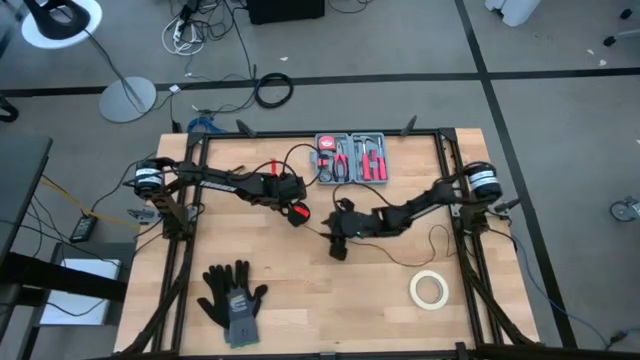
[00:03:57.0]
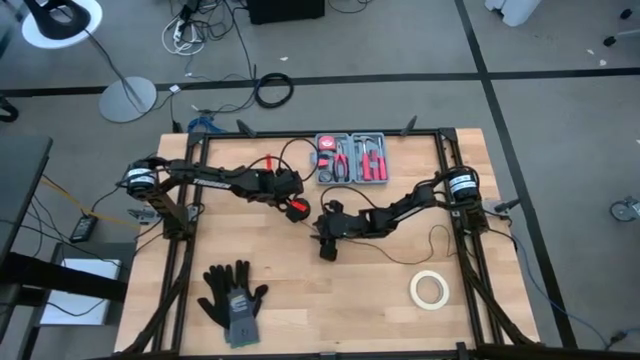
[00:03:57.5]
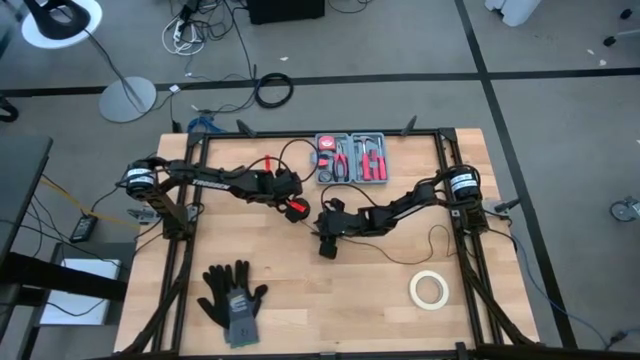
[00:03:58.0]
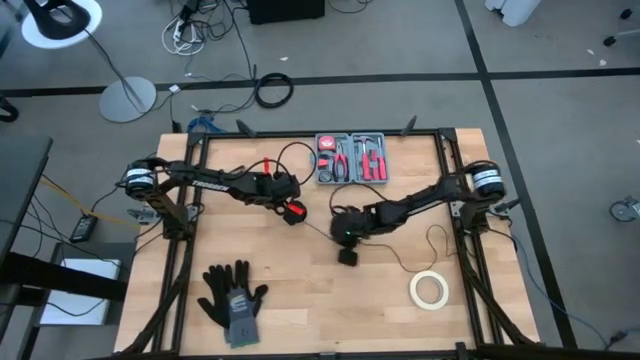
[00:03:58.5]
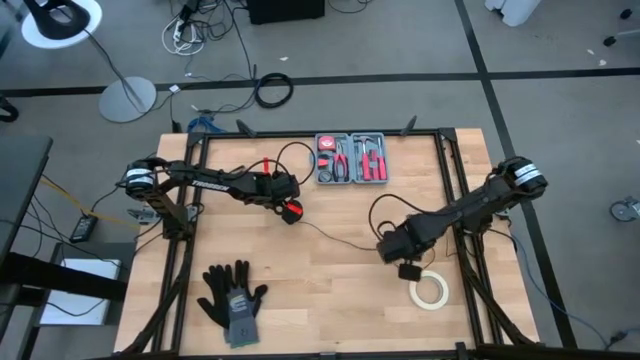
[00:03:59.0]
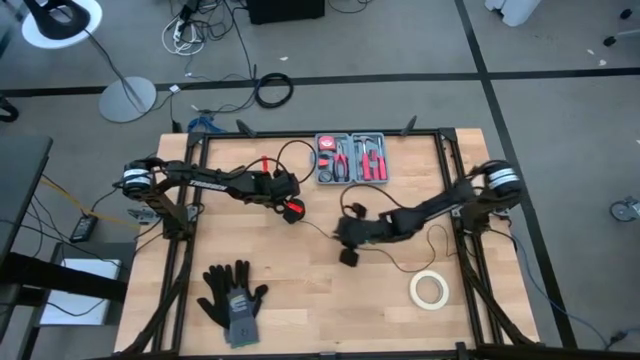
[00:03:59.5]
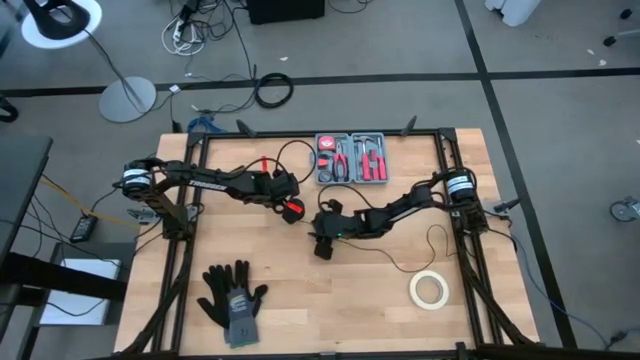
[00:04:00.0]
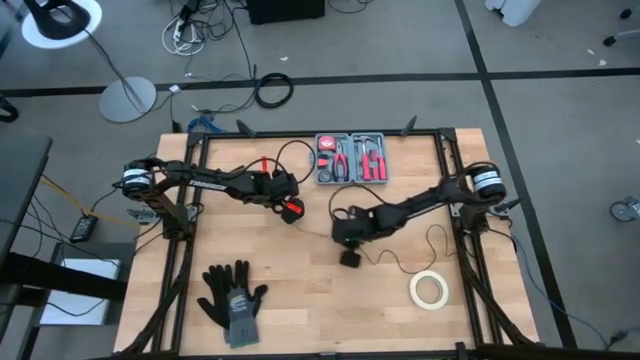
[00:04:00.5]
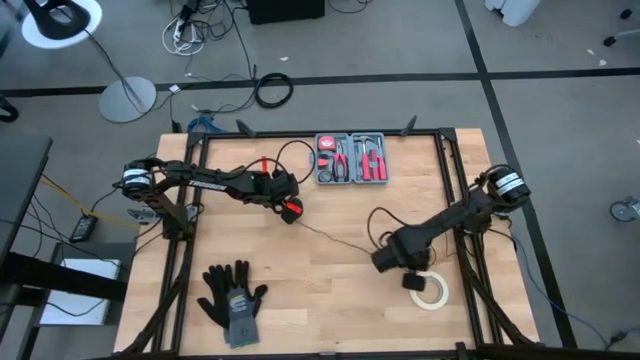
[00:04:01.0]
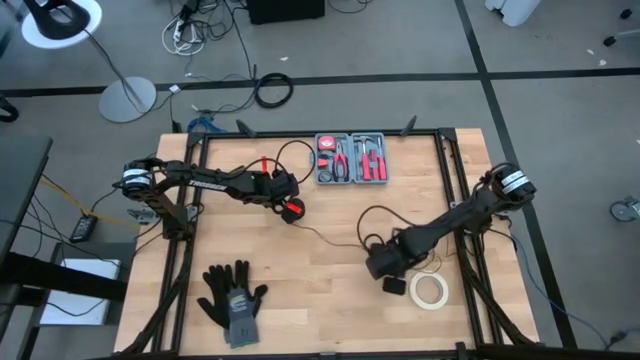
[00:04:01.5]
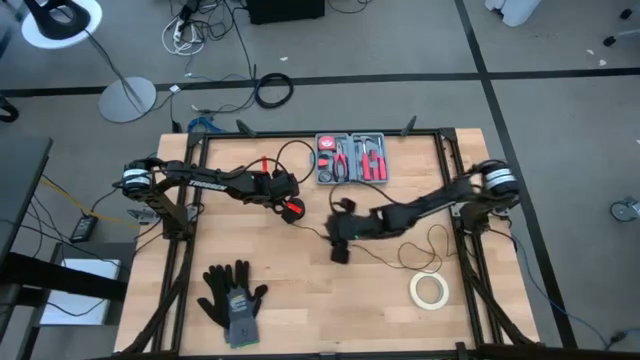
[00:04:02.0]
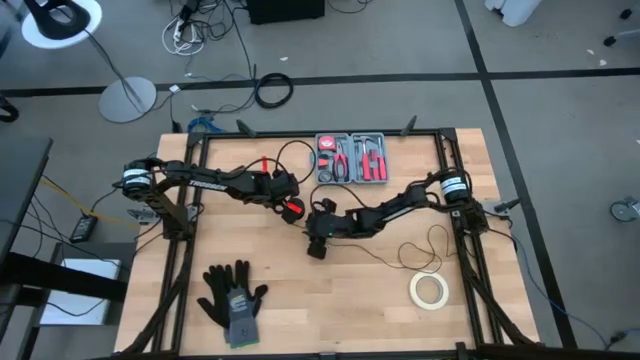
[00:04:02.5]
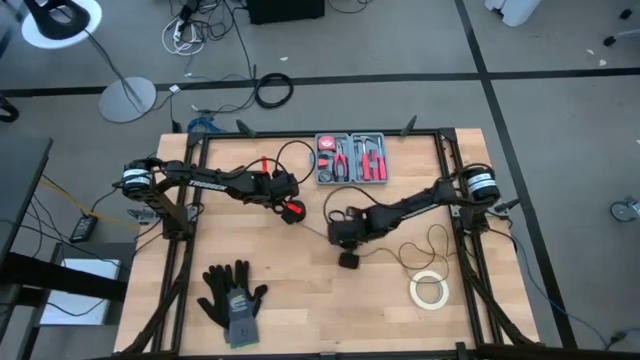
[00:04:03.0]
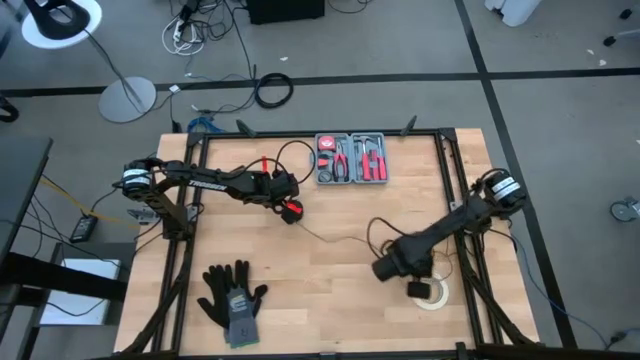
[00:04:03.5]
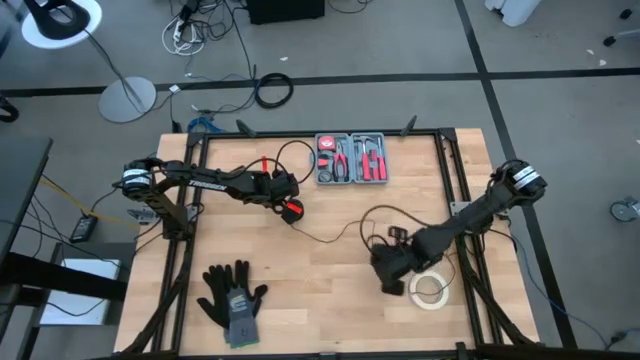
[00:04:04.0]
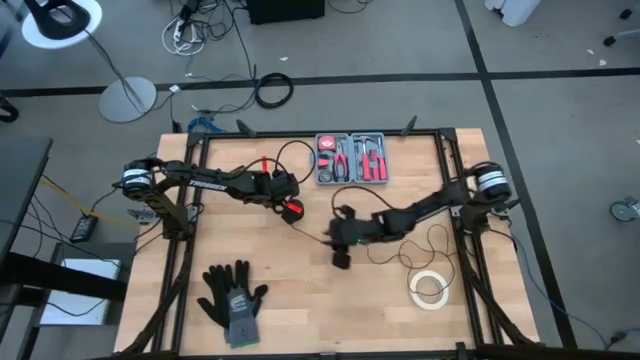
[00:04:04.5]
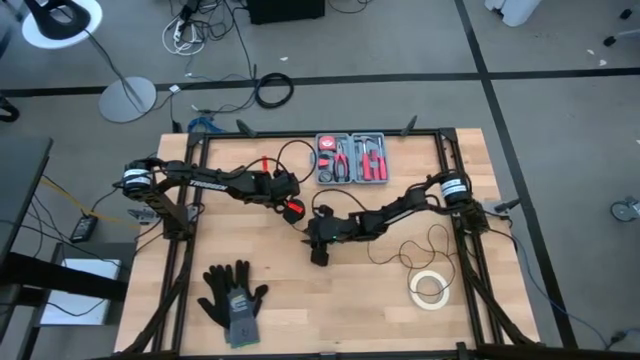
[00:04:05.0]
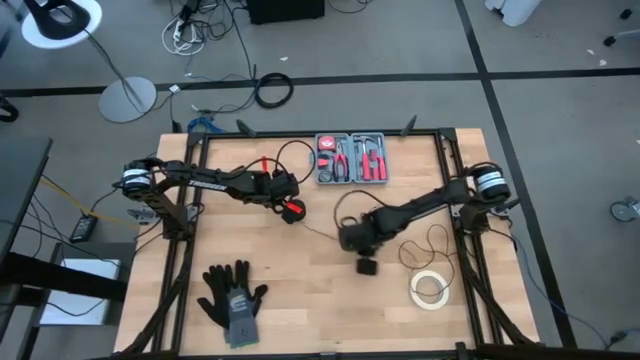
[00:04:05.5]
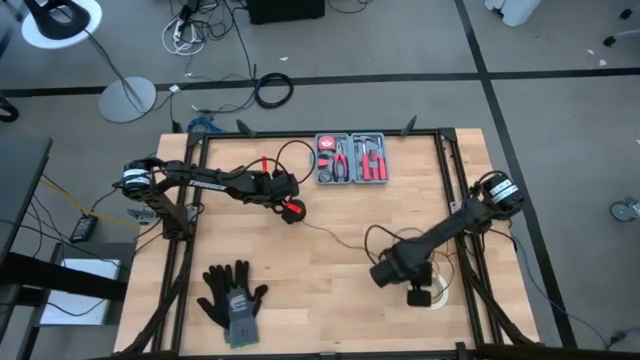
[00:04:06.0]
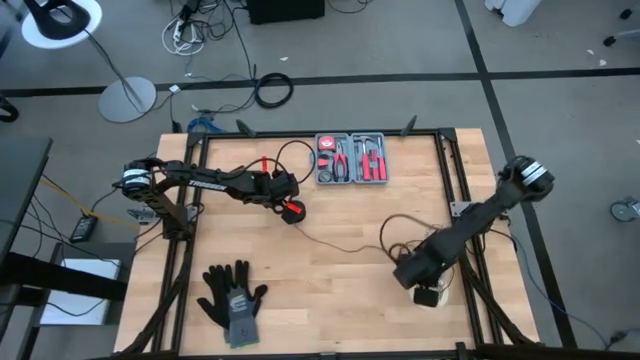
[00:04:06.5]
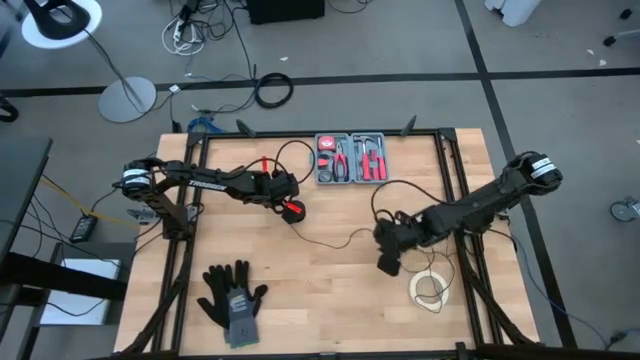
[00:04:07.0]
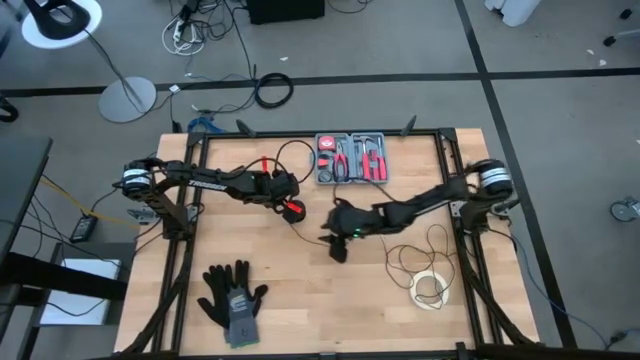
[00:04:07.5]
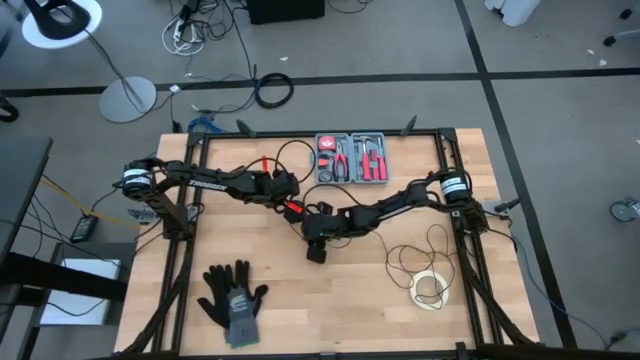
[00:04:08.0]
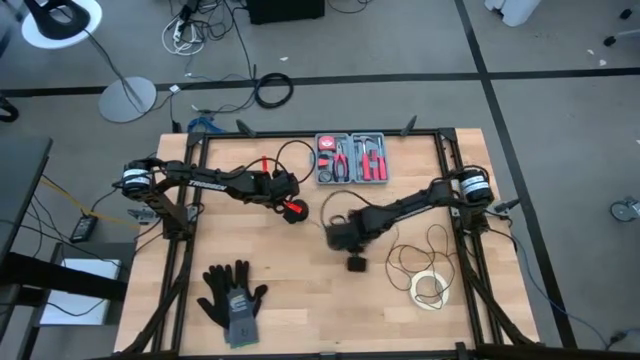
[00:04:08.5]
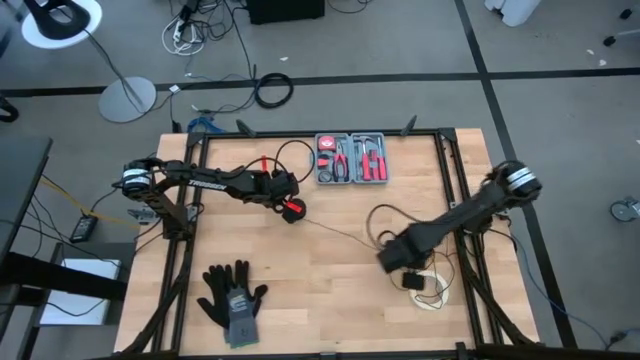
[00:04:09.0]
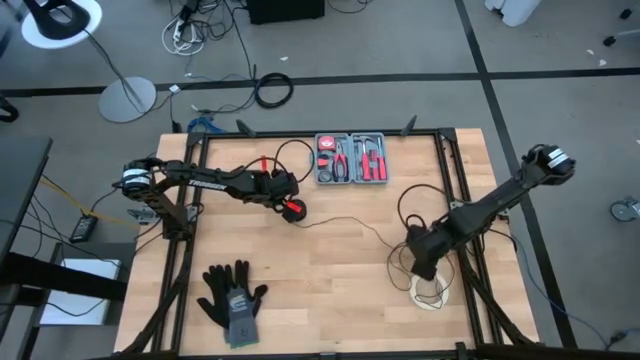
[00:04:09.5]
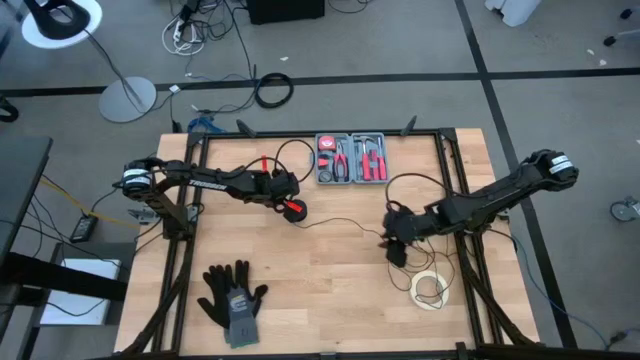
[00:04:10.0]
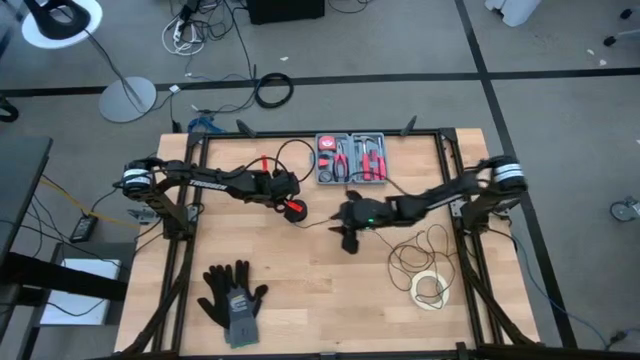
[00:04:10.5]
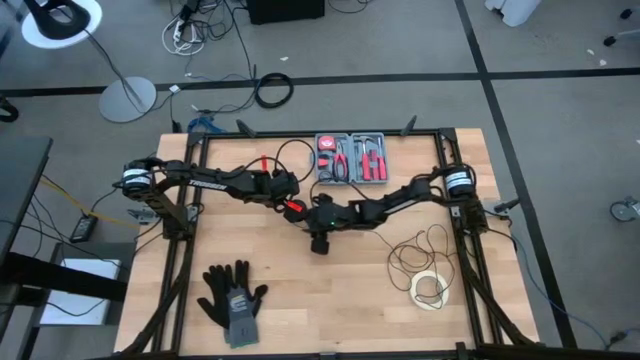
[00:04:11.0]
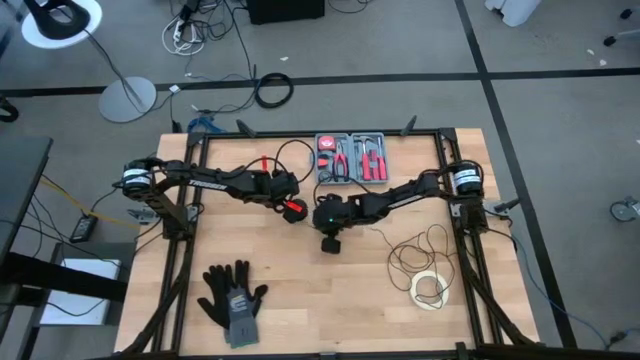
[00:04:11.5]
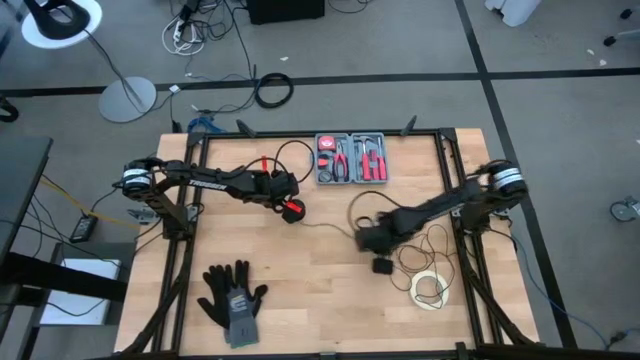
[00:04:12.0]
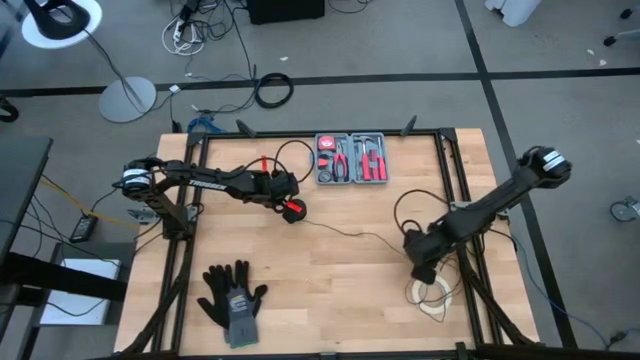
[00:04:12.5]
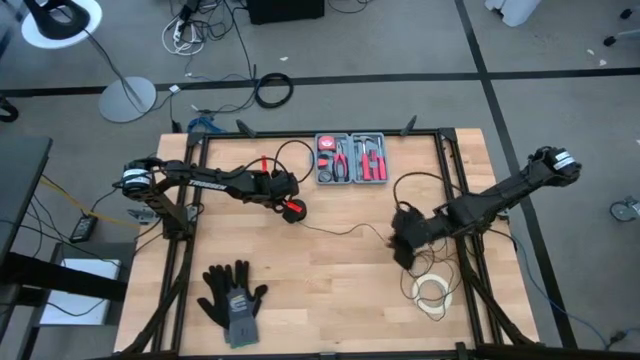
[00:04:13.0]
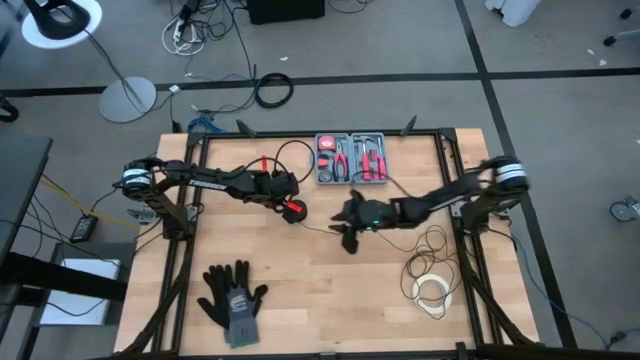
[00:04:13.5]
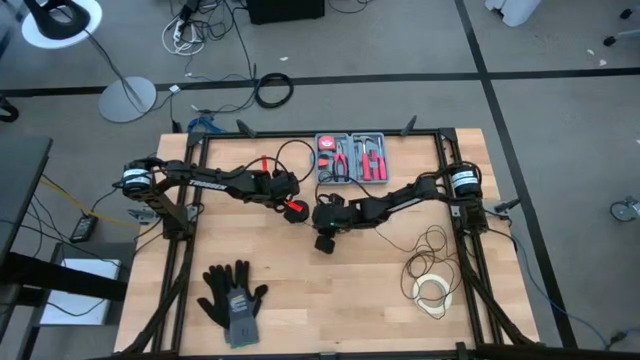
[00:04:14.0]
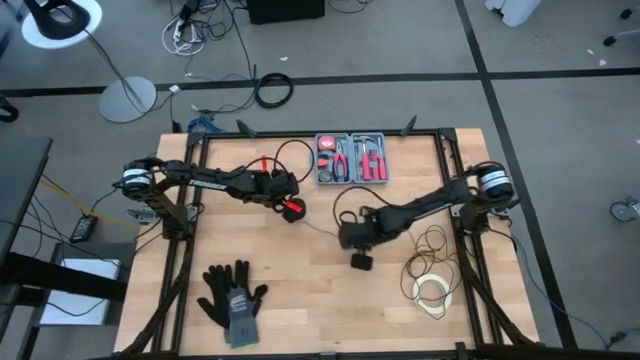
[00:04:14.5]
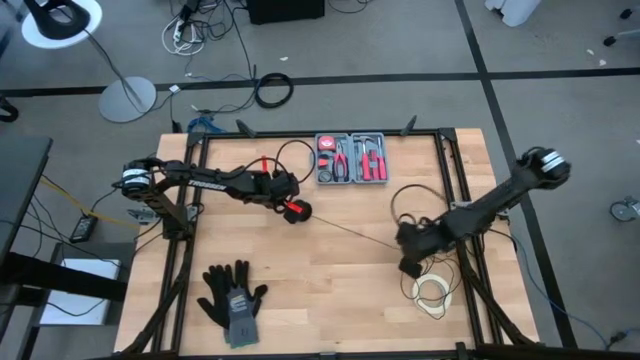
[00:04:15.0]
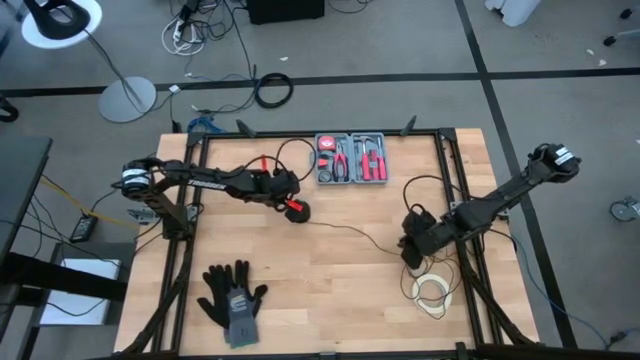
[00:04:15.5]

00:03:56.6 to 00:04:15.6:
Task: Coil cords
Uncoil the black wire from the black spool
